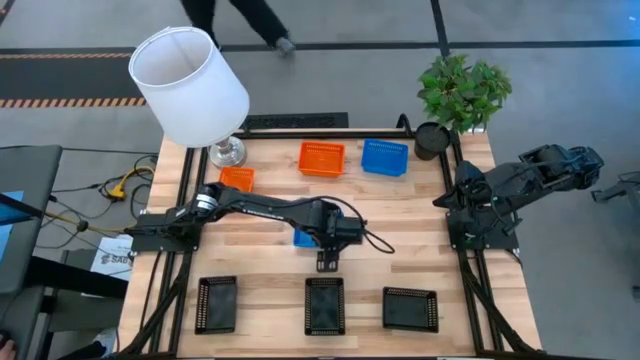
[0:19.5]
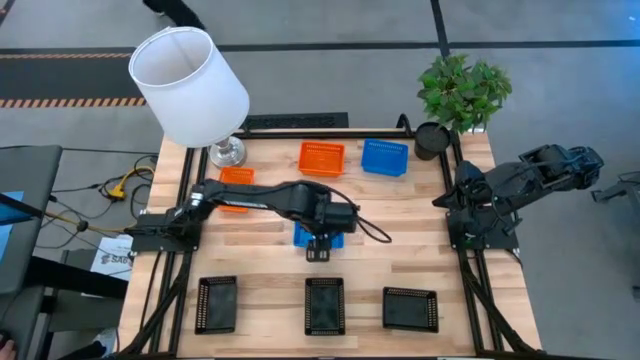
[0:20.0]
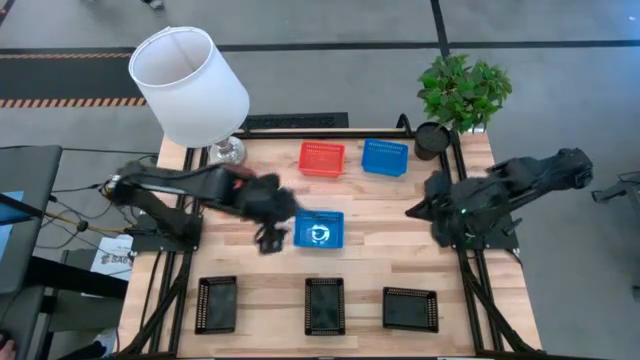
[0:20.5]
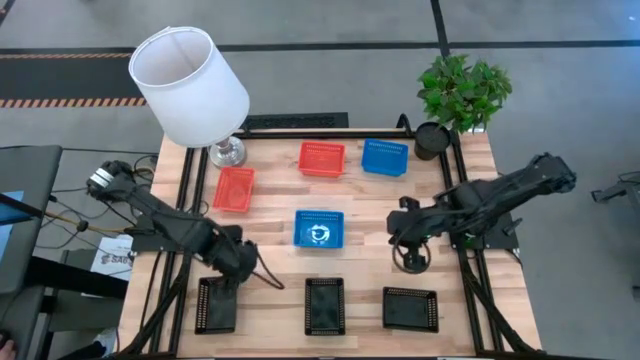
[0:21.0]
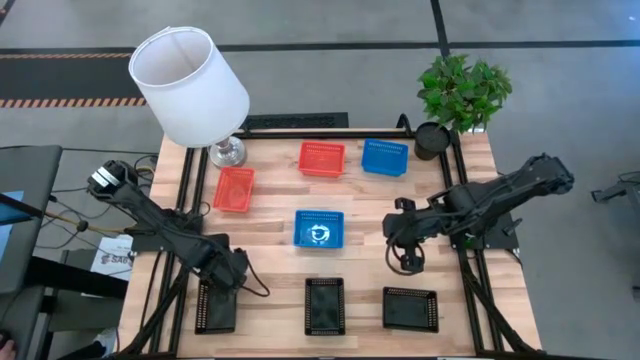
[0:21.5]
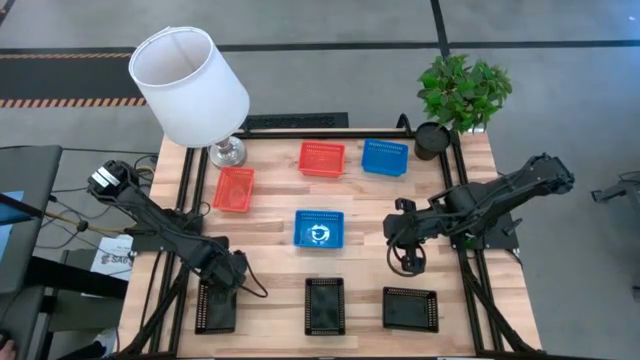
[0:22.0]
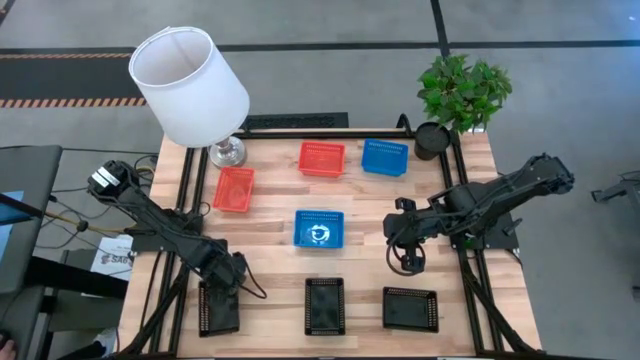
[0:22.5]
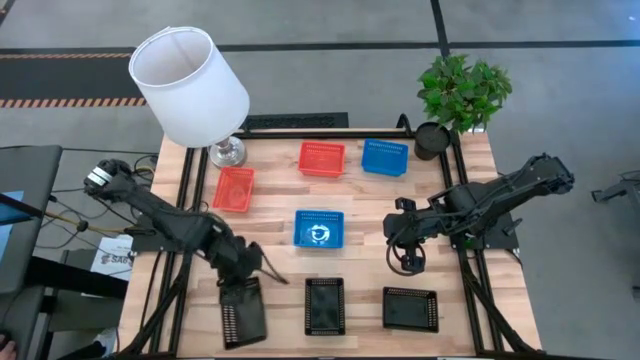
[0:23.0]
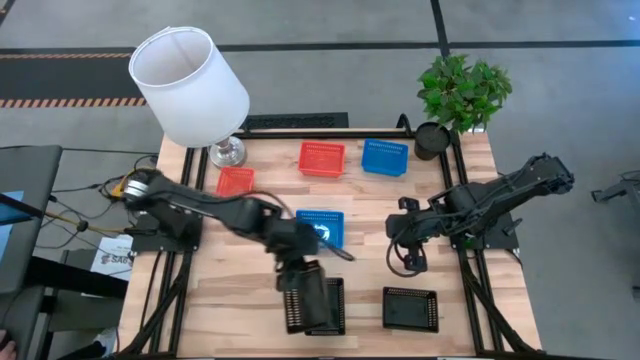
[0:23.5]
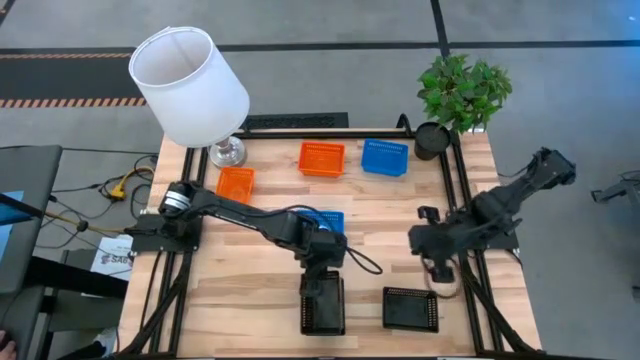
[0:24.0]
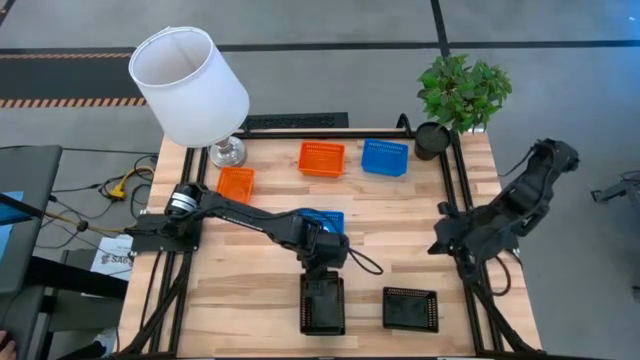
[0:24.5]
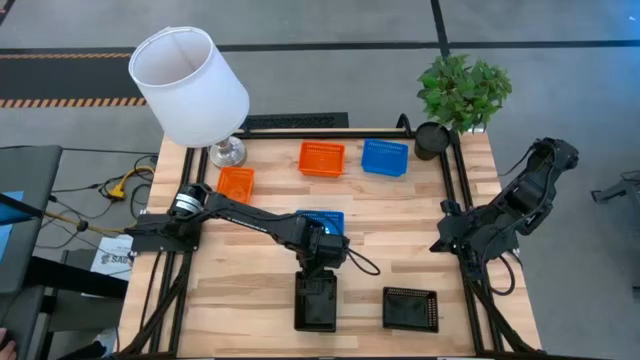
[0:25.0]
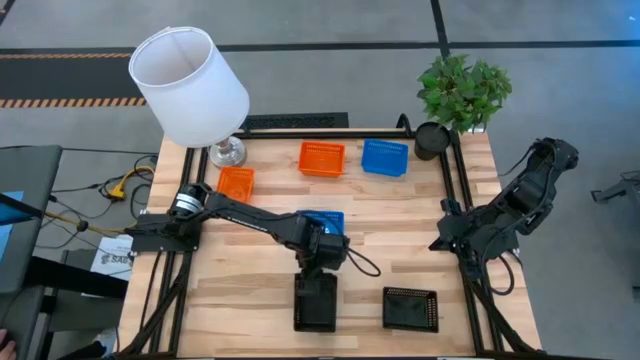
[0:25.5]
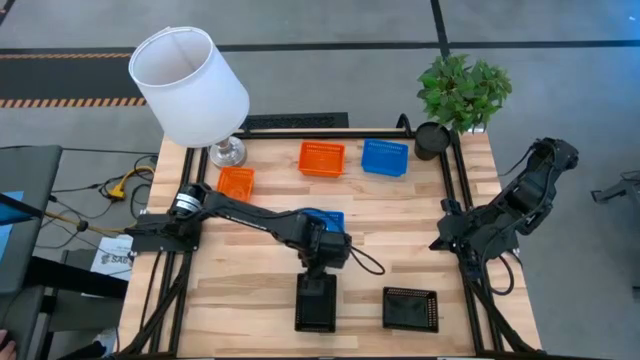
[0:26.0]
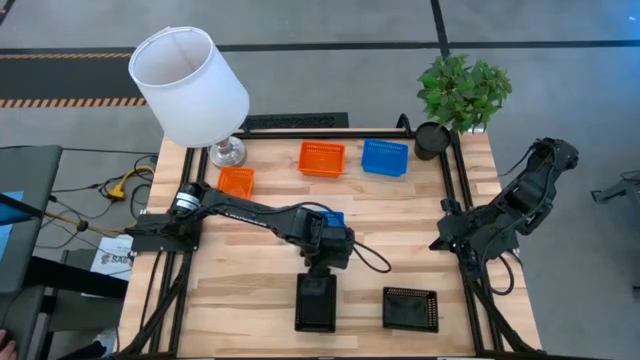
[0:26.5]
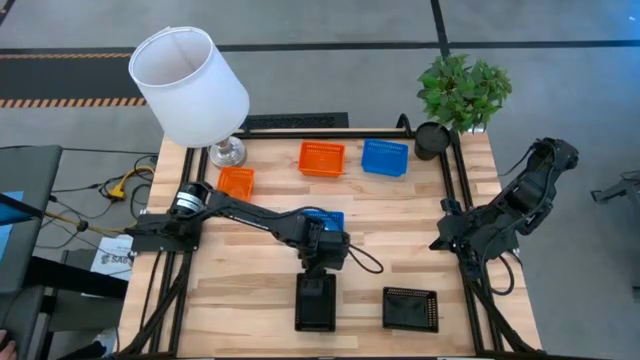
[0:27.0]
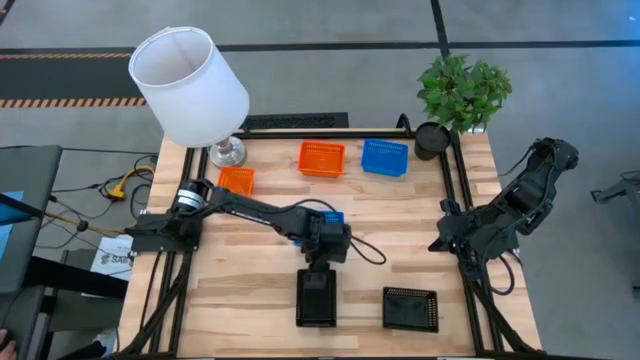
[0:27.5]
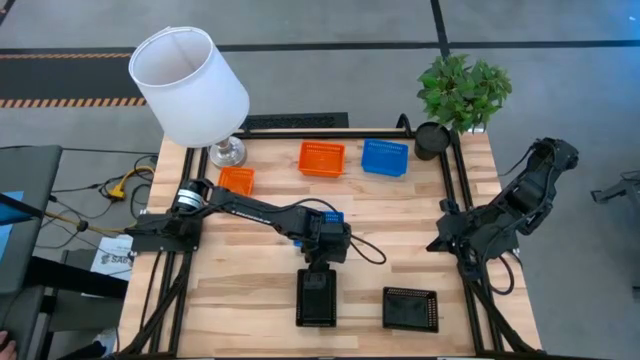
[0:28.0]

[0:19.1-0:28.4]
Stack the left black bin on the middle black bin

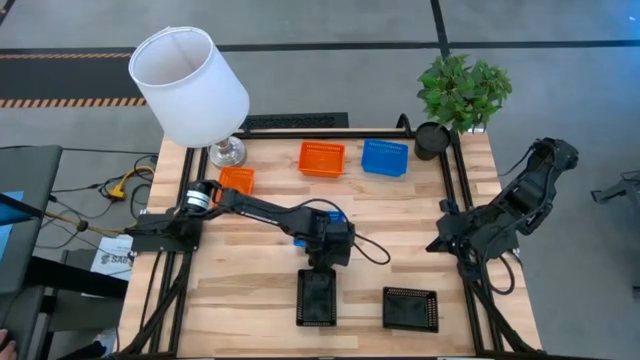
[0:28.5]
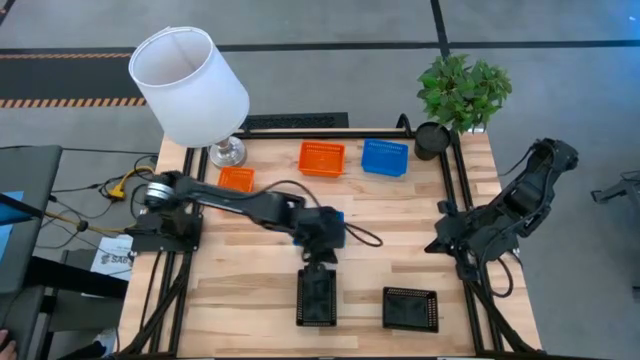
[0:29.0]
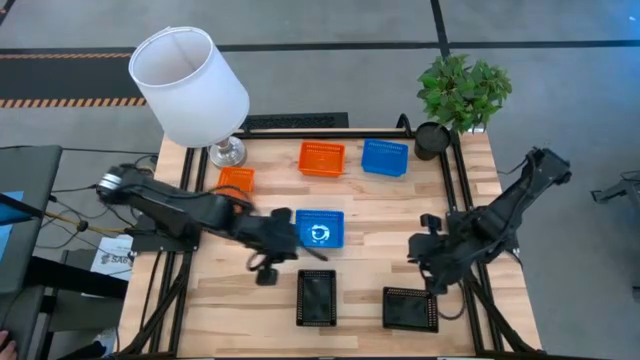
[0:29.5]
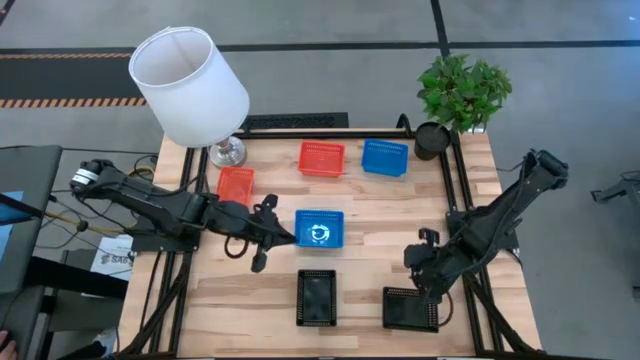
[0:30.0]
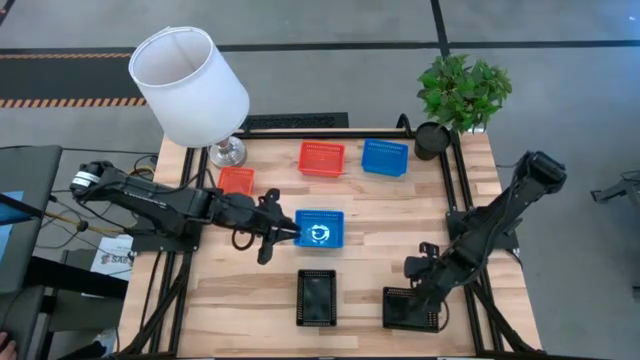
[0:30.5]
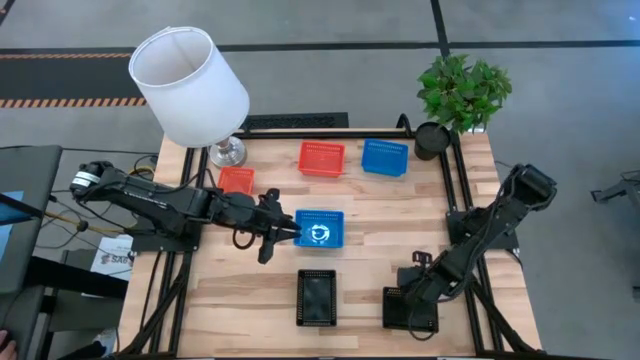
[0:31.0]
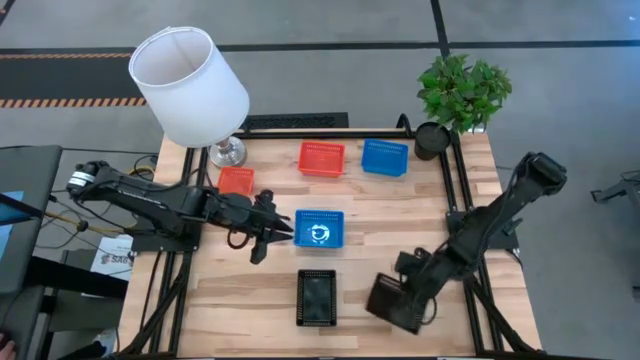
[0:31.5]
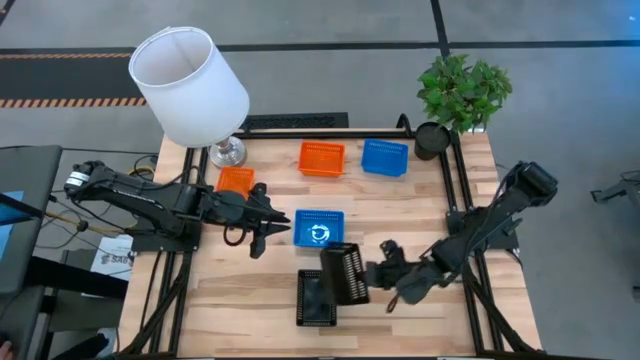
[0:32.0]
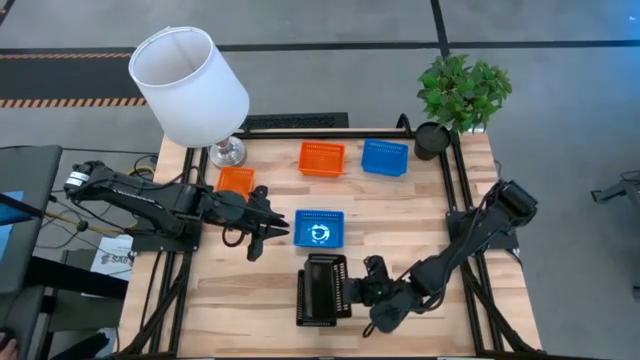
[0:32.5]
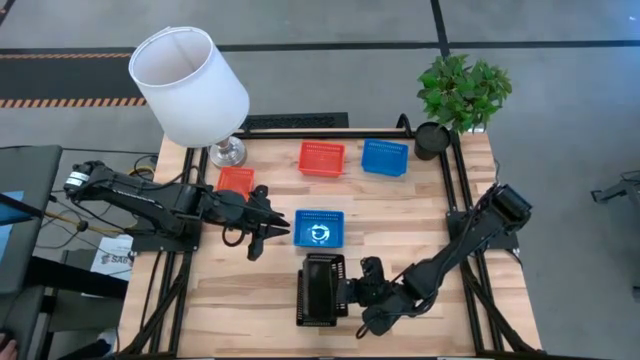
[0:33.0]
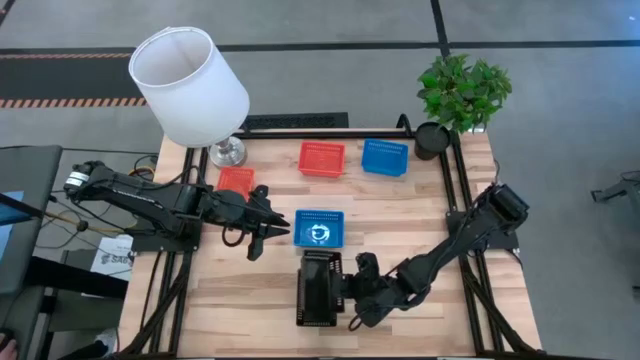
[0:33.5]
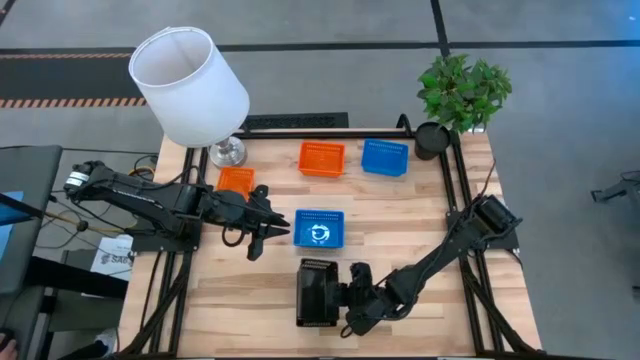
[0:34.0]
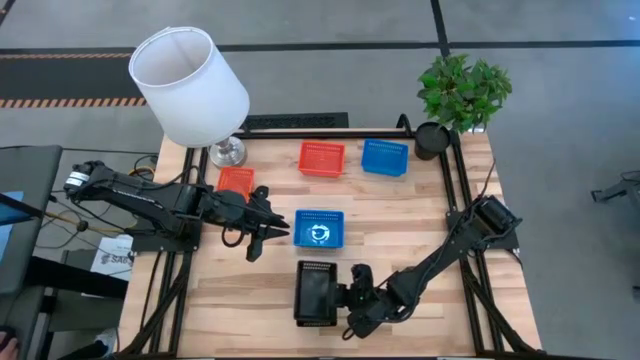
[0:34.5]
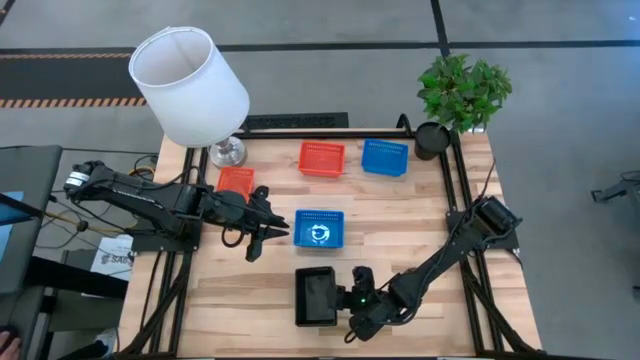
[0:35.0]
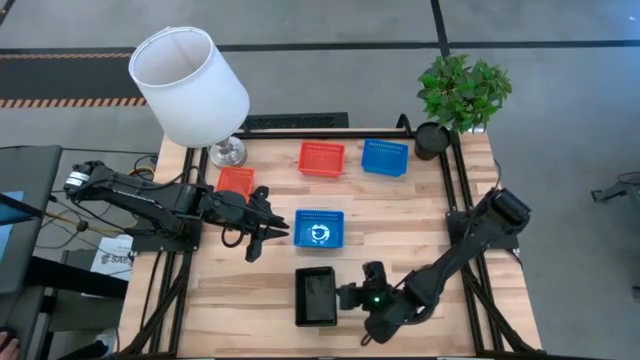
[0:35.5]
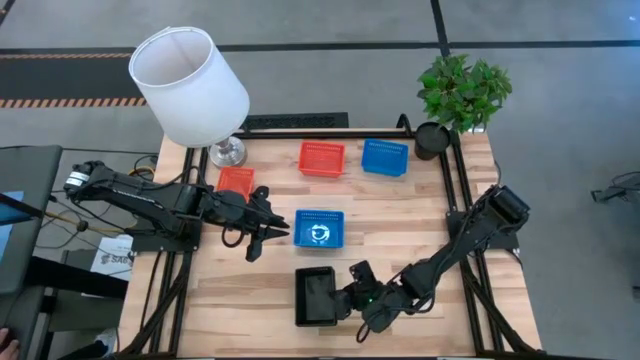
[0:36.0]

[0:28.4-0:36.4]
Stack the right black bin on the stacked black bins

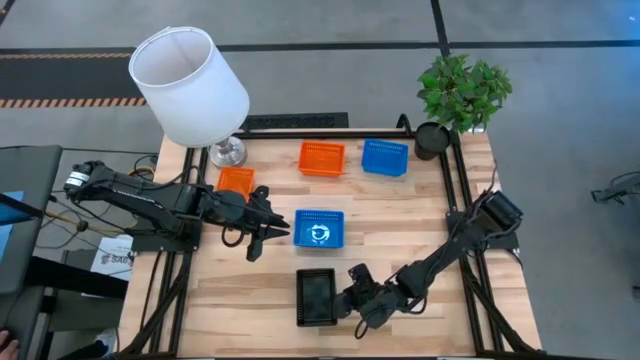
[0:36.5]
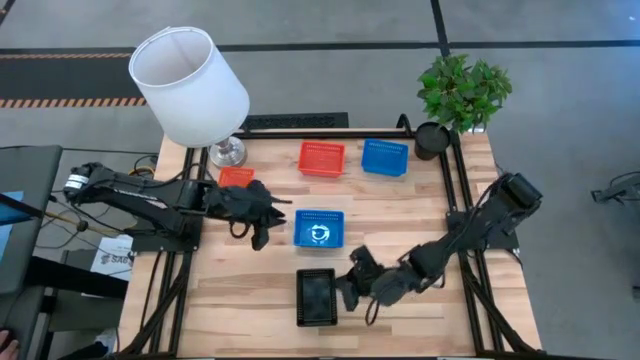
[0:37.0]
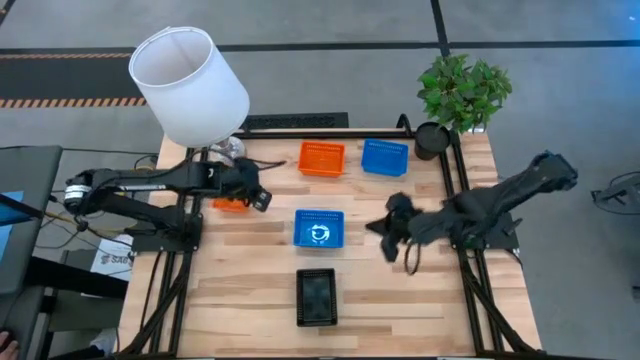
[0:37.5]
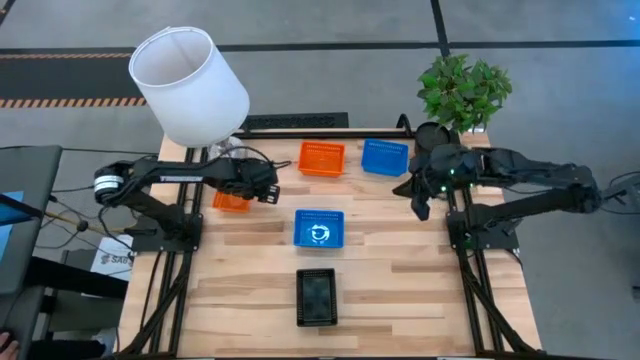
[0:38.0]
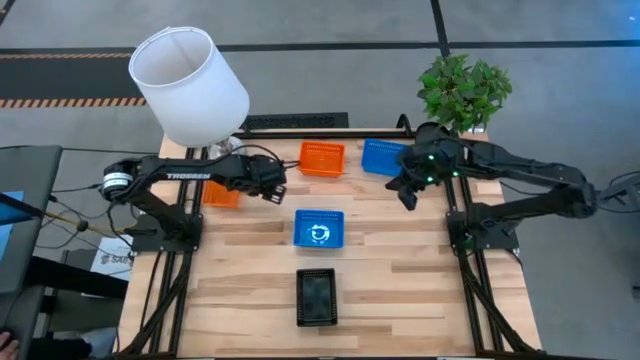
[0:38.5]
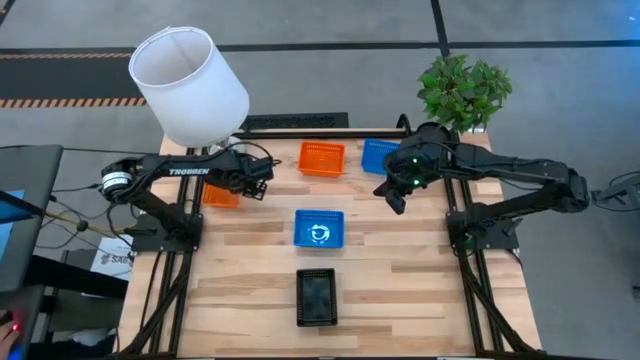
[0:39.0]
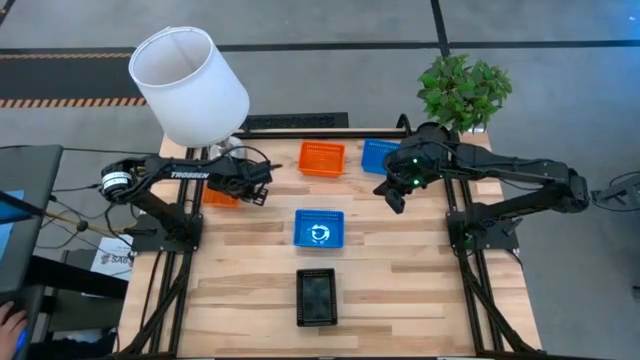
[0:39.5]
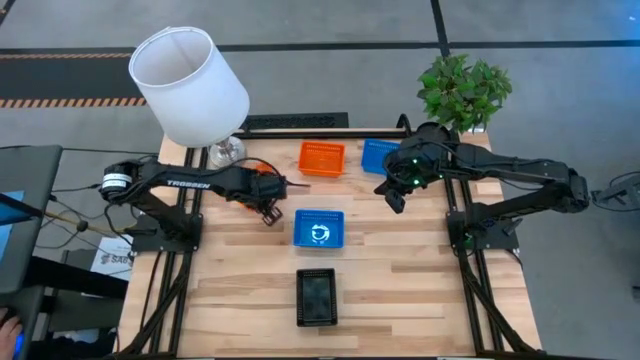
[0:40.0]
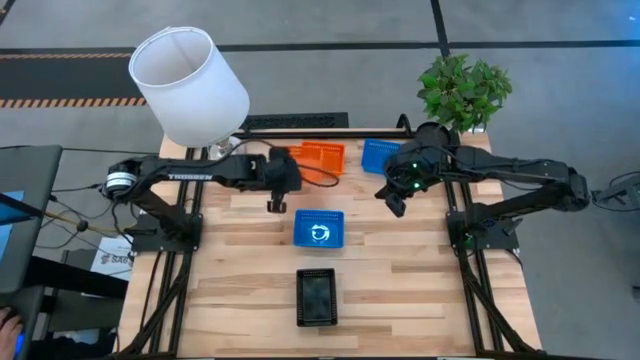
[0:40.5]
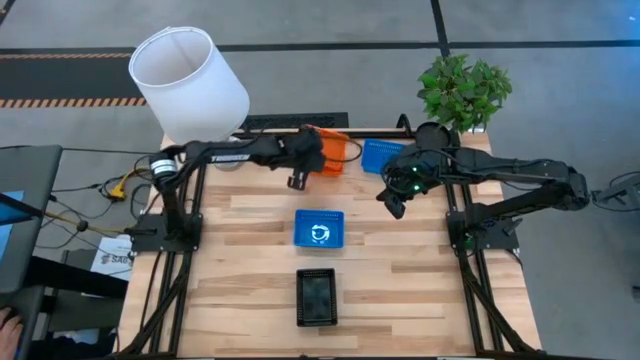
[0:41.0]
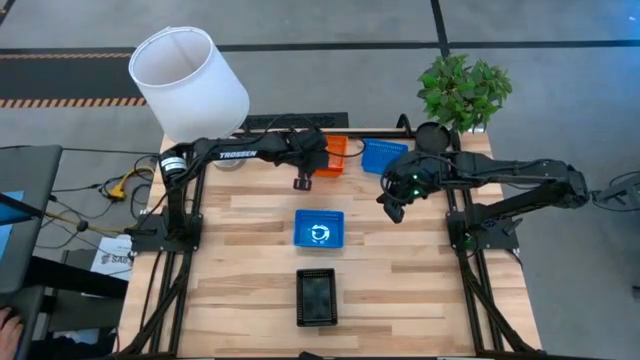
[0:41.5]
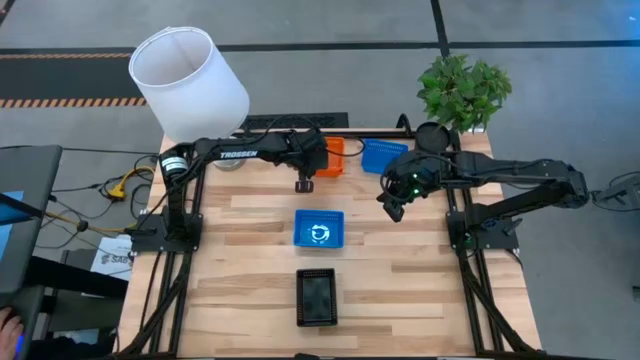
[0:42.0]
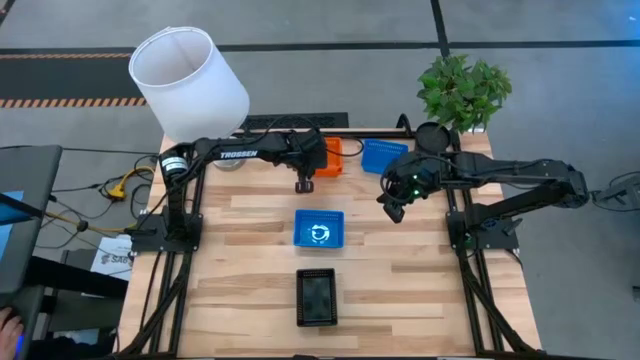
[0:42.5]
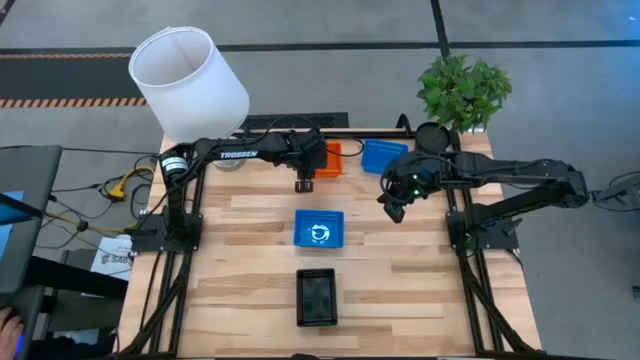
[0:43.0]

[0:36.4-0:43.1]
Stack the bottom orange bin on the stacked orange bins
